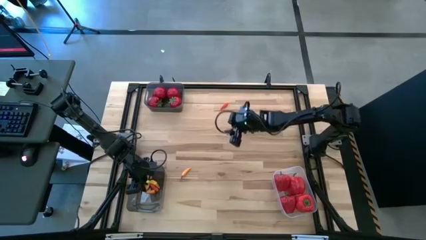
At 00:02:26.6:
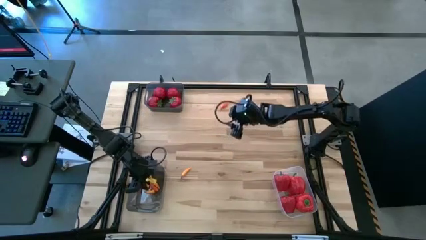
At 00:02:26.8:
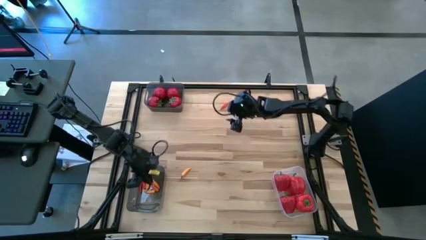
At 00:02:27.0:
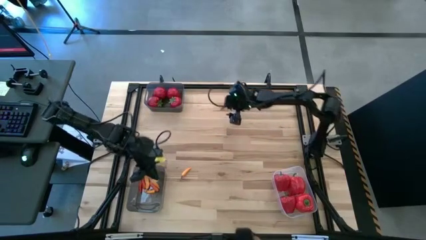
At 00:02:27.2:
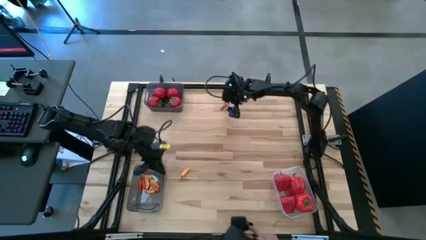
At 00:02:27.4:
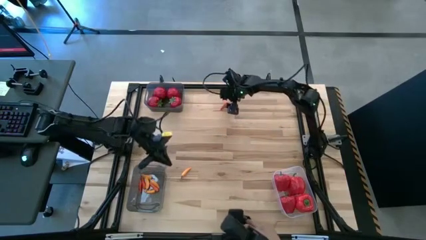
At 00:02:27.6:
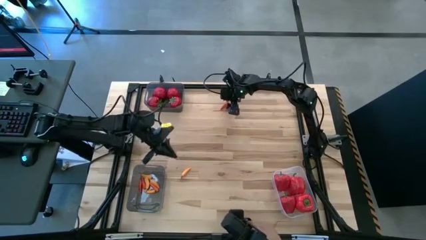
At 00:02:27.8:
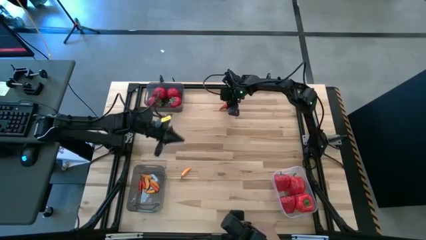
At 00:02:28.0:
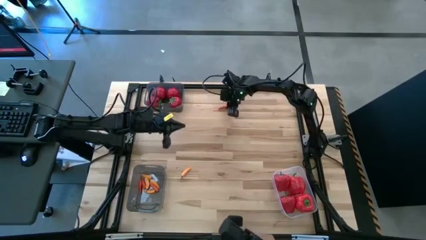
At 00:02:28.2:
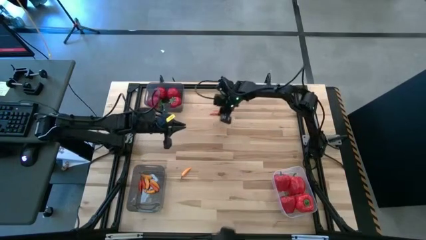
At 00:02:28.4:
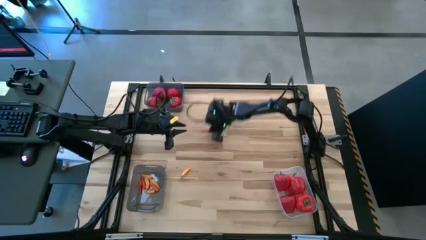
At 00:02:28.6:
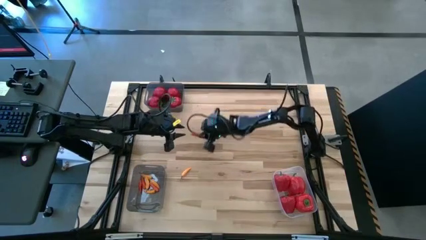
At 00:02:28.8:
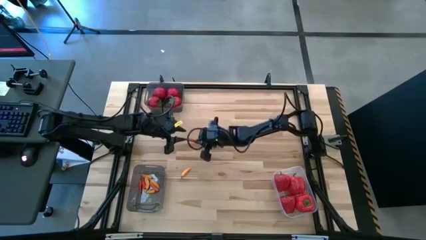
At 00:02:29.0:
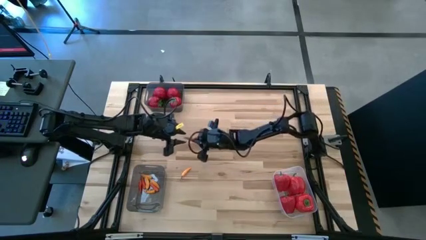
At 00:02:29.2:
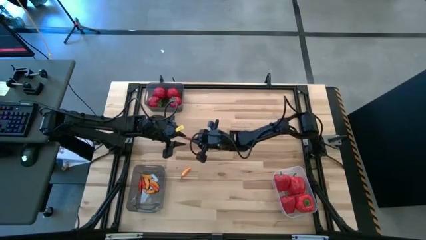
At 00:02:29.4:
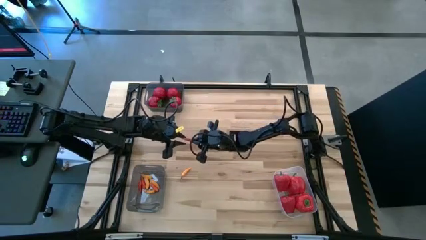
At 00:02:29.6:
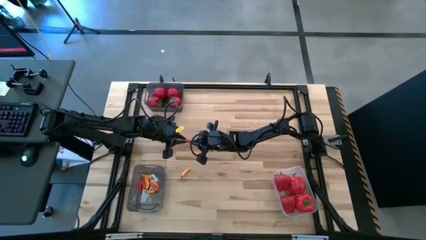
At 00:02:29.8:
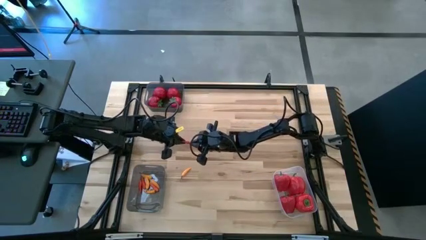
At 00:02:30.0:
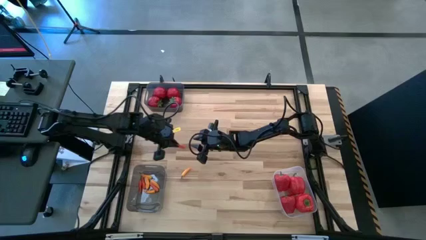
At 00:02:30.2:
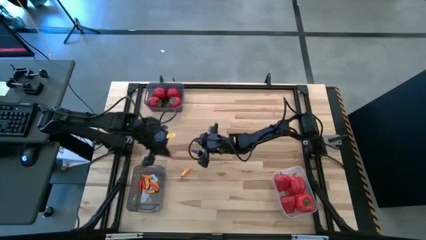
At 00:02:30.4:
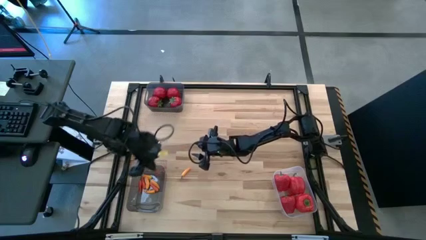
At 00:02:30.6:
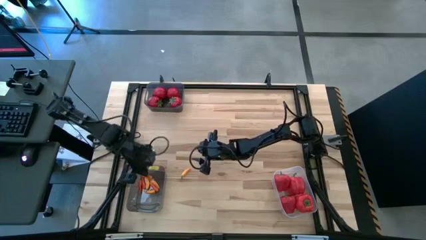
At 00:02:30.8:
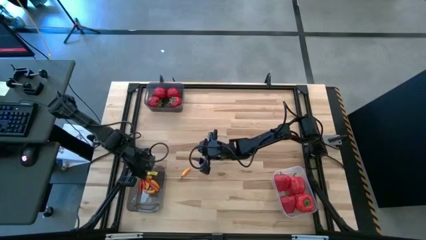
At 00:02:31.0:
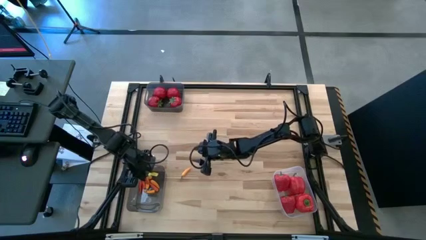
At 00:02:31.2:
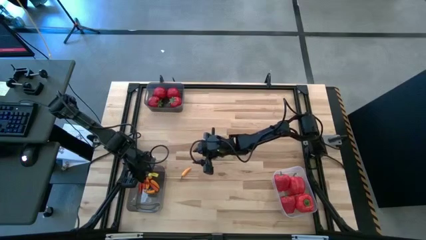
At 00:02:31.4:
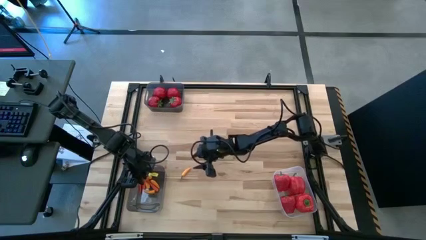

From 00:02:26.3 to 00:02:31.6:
Task: Sort produce into baskets
Put the orange chili pepper into the bottom black bin

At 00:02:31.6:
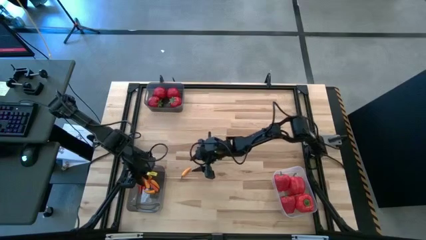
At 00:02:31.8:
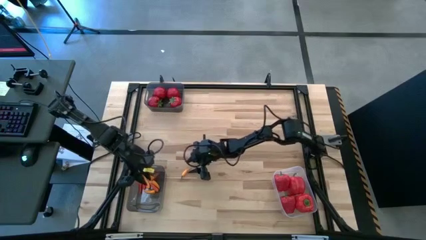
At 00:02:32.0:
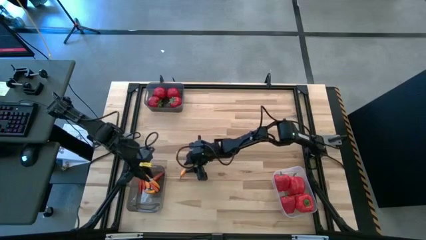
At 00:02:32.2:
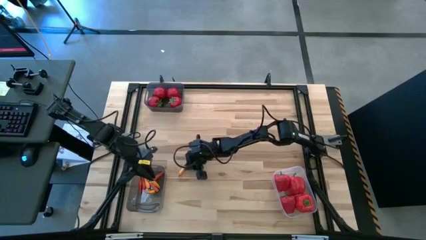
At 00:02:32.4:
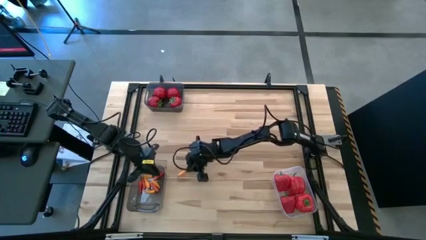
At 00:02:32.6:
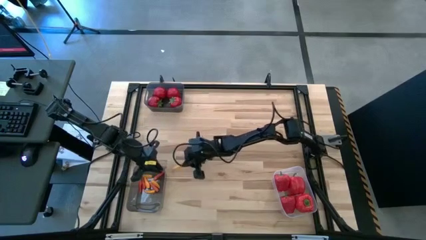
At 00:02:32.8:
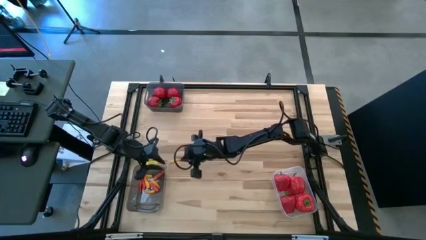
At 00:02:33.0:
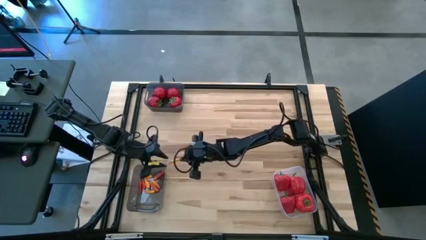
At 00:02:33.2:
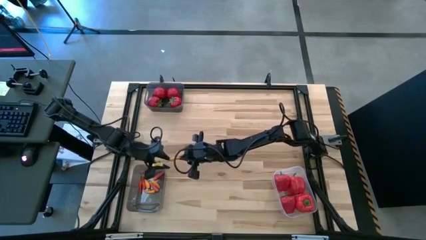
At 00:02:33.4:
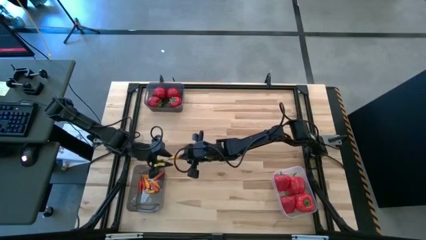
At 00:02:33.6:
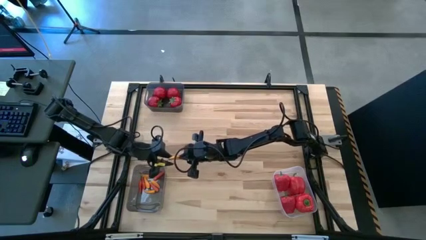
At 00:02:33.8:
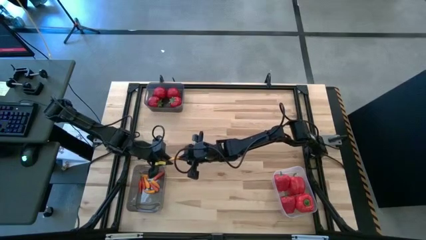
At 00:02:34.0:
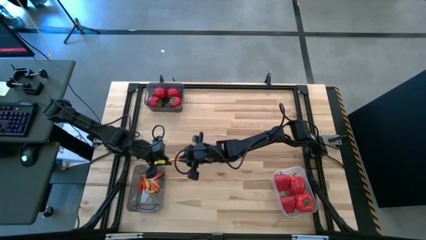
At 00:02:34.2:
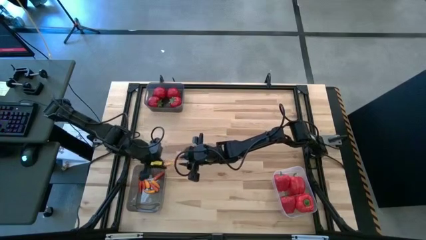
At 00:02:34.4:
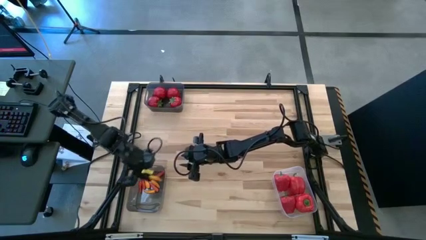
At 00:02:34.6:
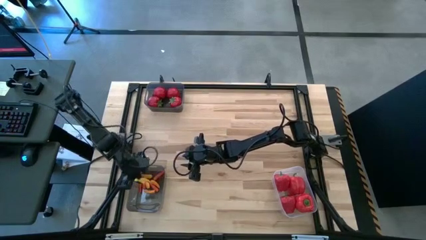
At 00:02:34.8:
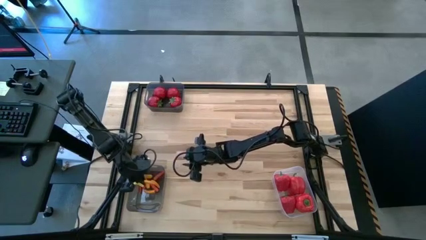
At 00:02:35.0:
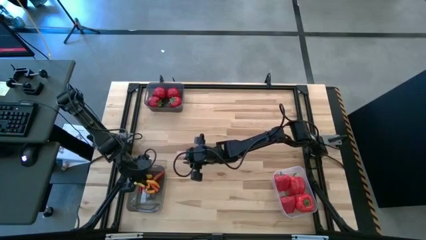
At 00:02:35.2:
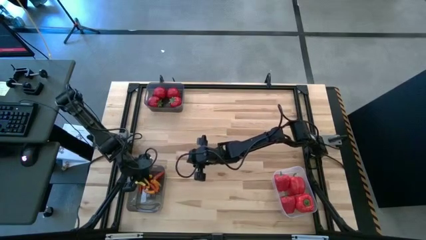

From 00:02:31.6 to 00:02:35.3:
Put the yellow chili pepper into the bottom black bin

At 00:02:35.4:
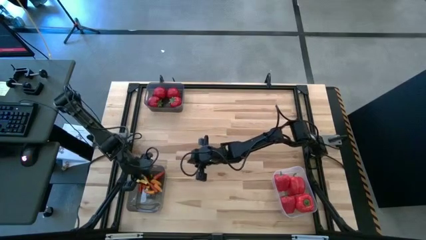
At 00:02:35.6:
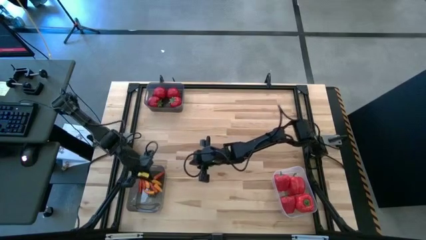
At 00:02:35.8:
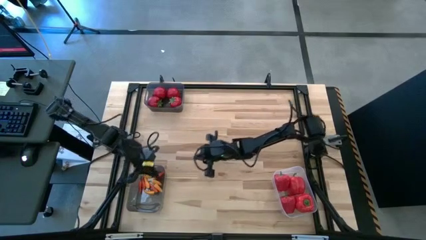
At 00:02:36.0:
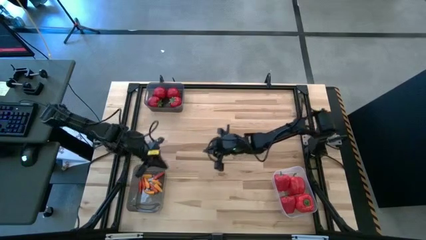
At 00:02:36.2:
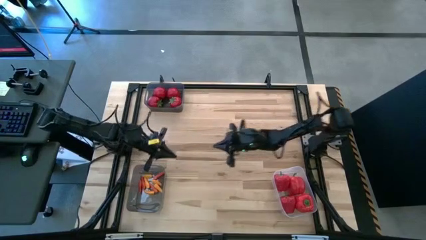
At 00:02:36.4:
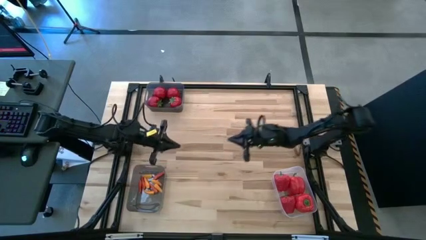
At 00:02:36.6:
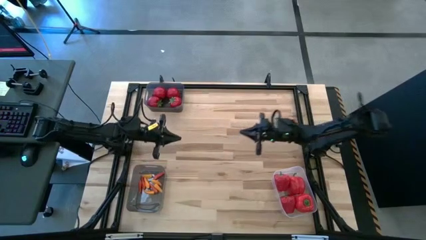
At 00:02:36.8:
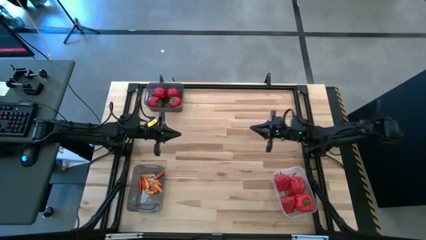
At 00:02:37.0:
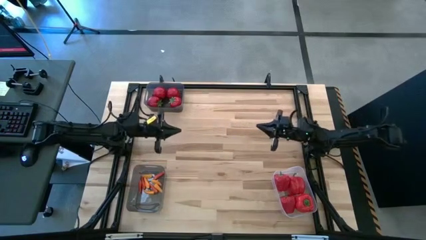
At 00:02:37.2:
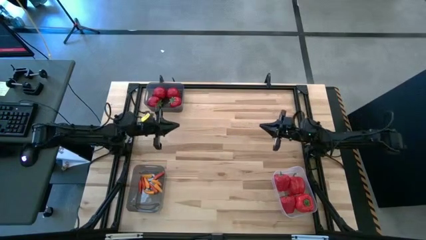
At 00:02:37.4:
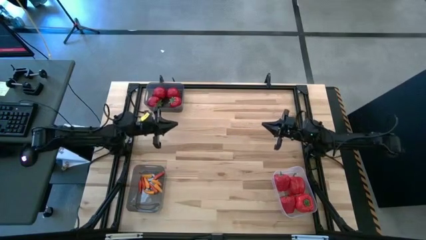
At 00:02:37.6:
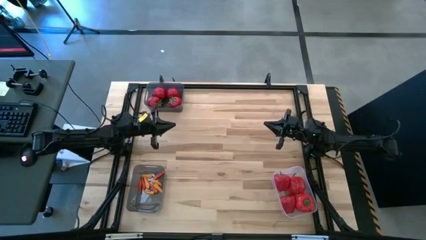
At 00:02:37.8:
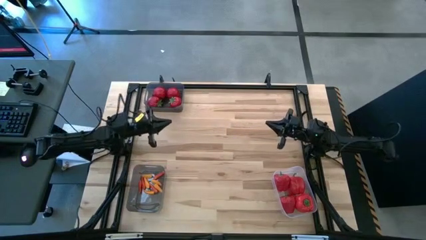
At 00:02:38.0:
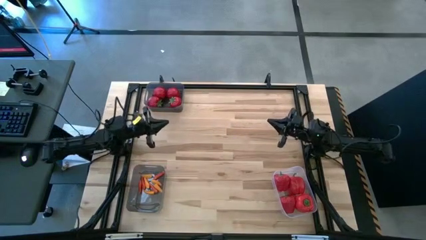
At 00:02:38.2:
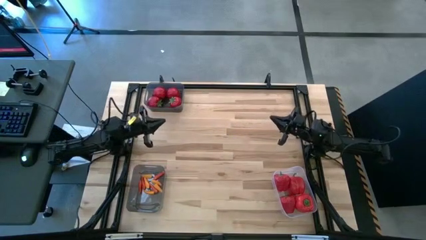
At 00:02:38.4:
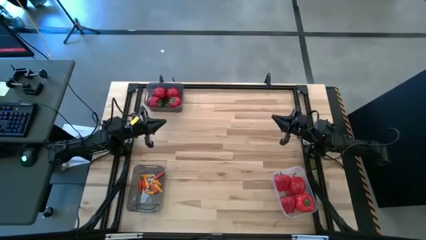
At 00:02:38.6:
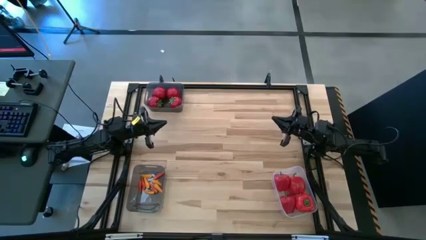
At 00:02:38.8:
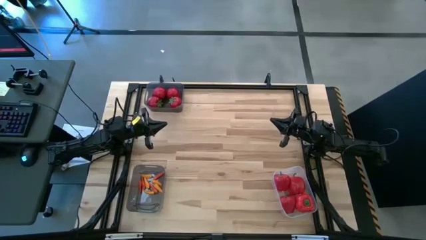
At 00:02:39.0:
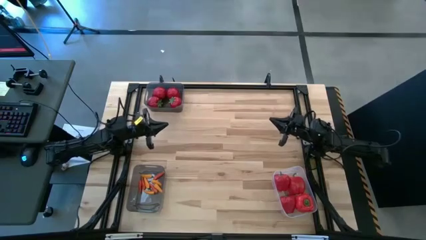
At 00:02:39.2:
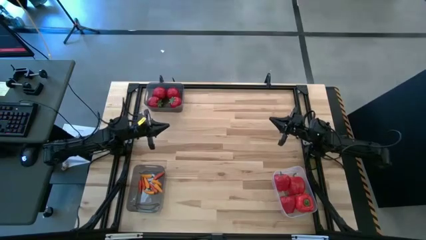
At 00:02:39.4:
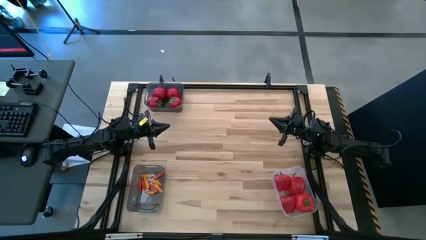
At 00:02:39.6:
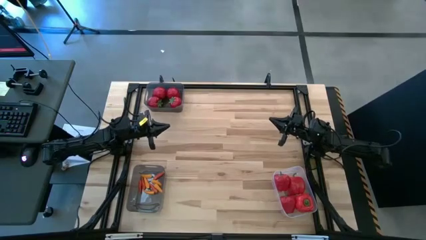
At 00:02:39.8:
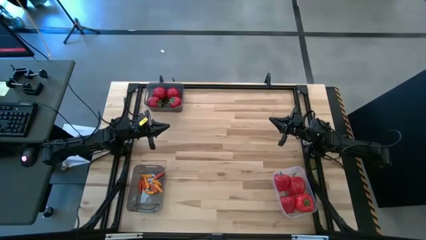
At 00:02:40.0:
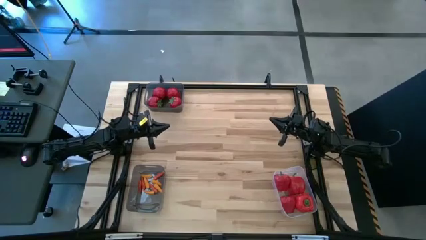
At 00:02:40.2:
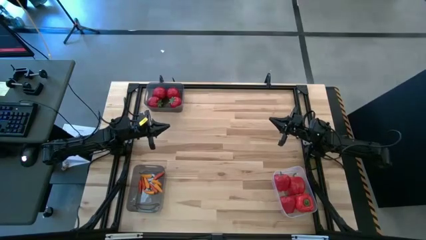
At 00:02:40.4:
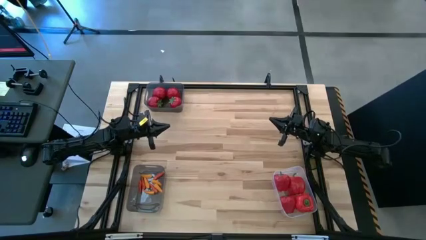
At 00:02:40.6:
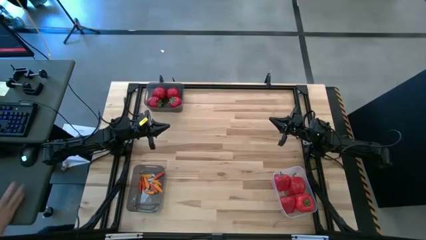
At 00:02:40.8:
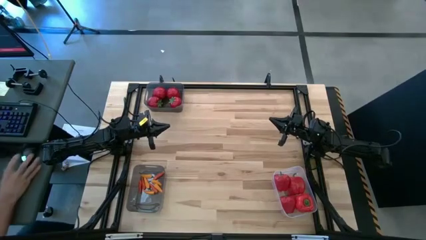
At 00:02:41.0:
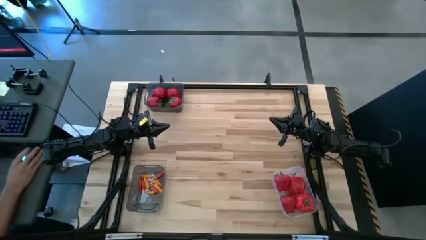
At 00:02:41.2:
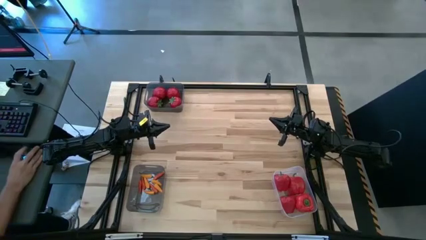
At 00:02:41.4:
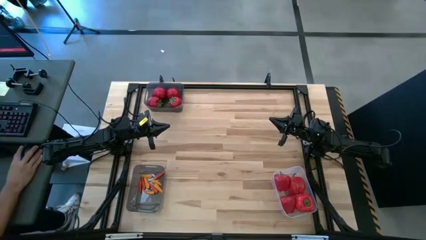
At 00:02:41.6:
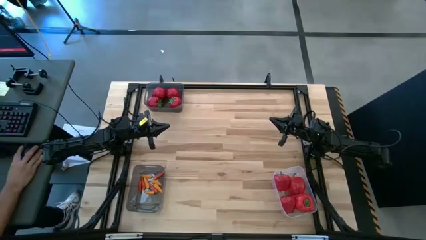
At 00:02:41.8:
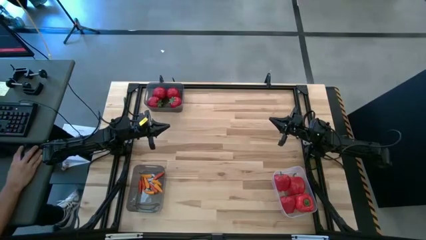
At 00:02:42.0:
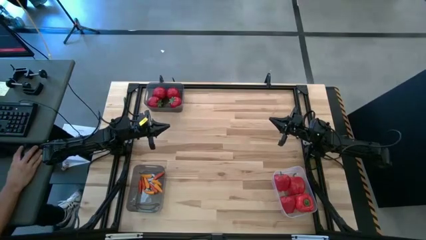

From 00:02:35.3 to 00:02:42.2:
Return to Home Position
